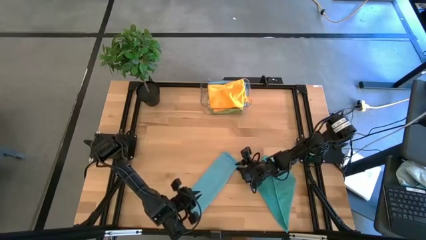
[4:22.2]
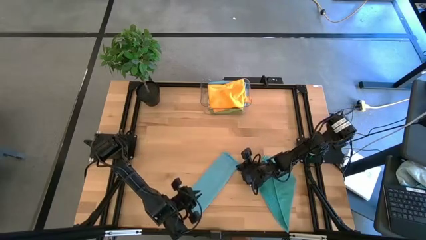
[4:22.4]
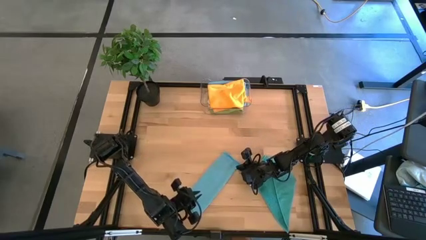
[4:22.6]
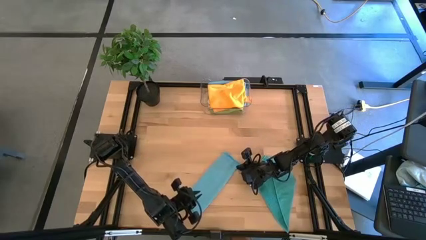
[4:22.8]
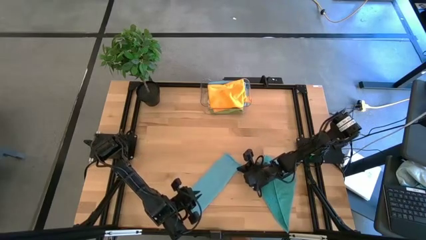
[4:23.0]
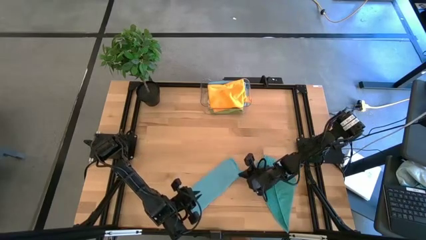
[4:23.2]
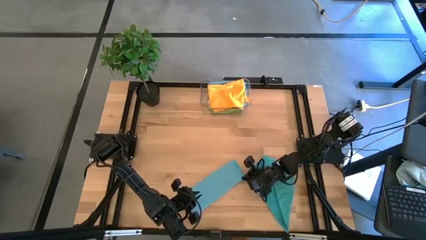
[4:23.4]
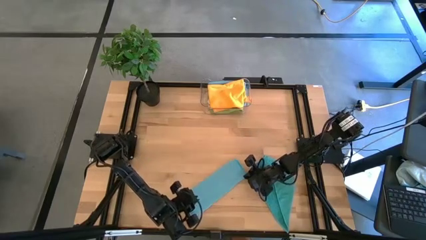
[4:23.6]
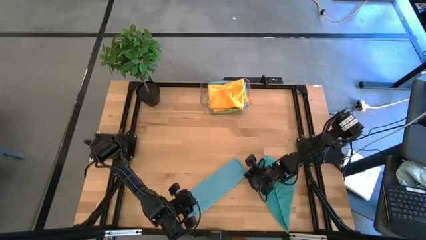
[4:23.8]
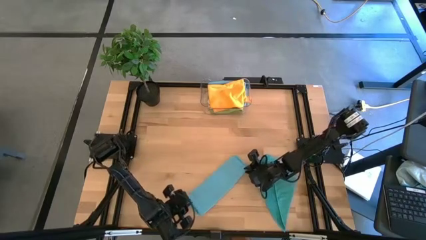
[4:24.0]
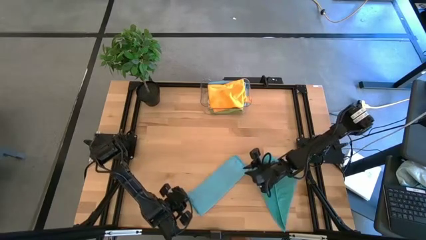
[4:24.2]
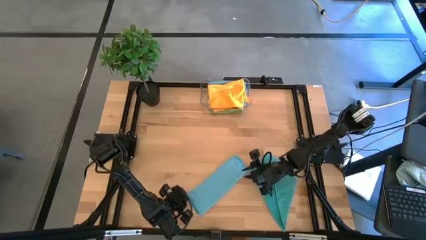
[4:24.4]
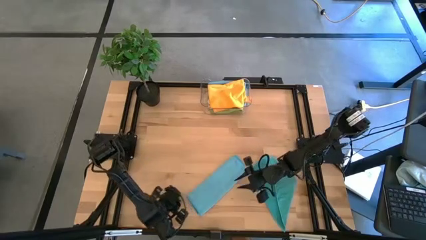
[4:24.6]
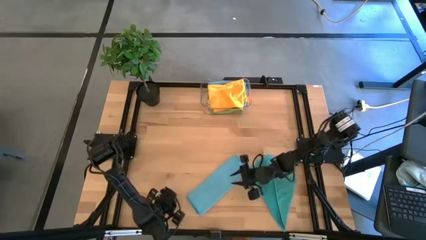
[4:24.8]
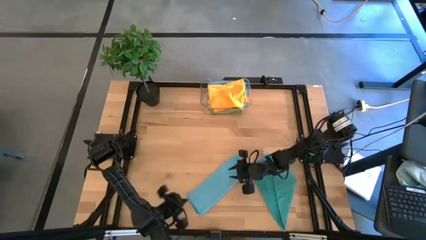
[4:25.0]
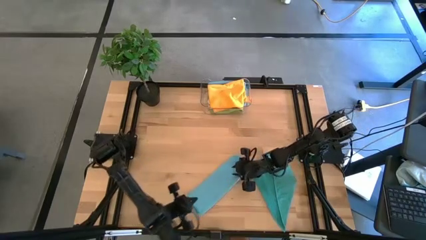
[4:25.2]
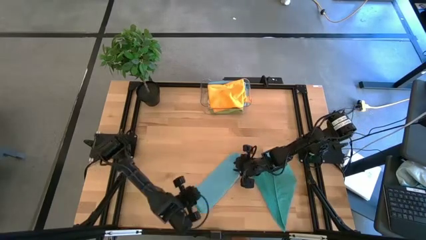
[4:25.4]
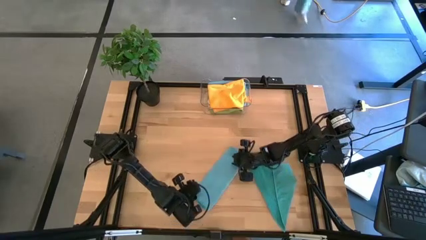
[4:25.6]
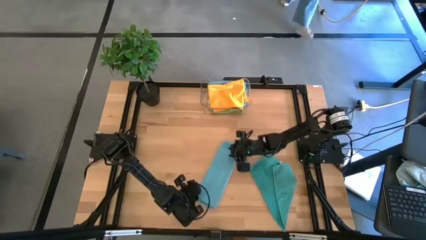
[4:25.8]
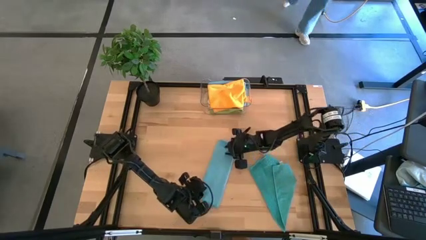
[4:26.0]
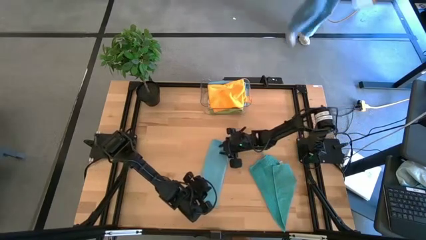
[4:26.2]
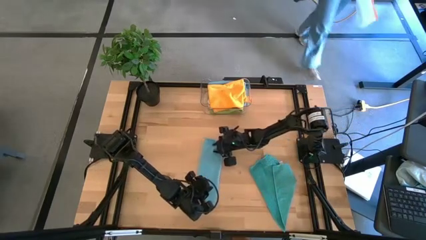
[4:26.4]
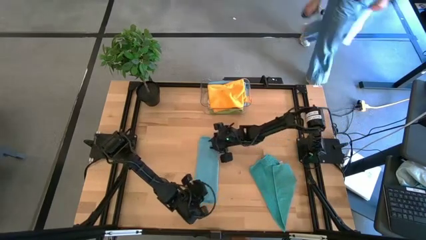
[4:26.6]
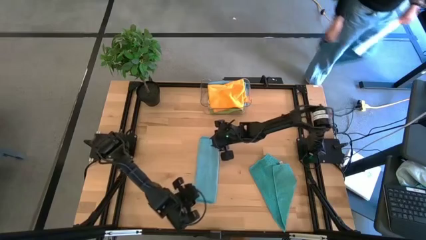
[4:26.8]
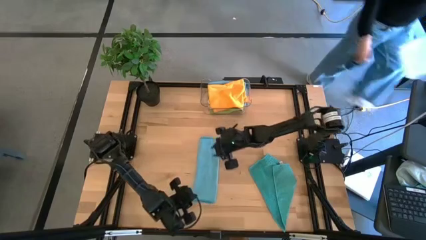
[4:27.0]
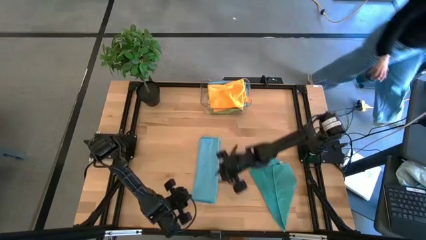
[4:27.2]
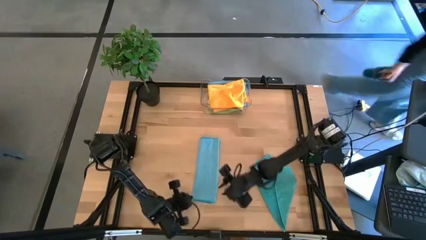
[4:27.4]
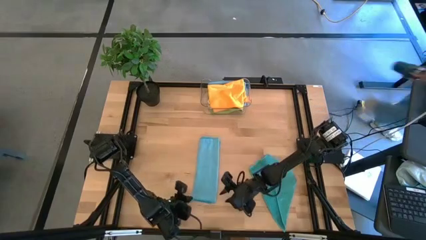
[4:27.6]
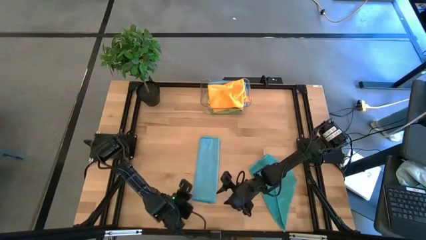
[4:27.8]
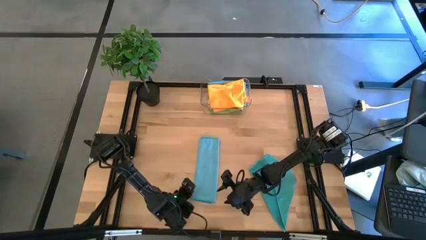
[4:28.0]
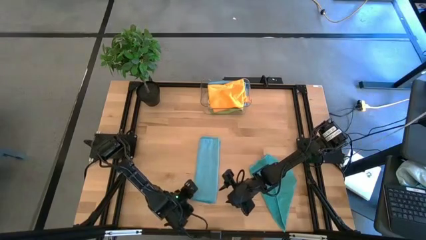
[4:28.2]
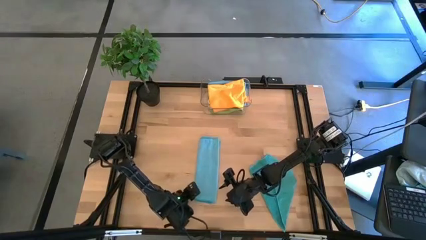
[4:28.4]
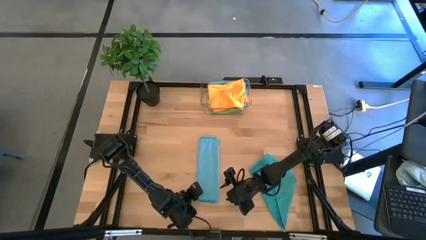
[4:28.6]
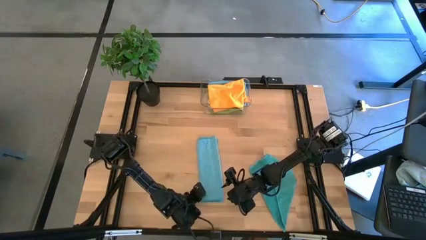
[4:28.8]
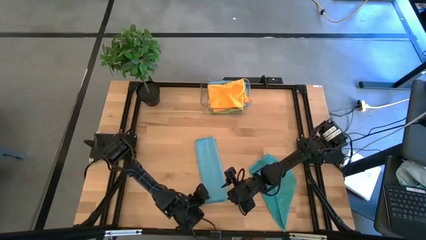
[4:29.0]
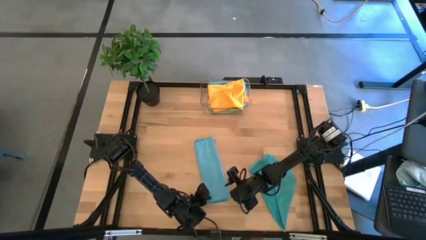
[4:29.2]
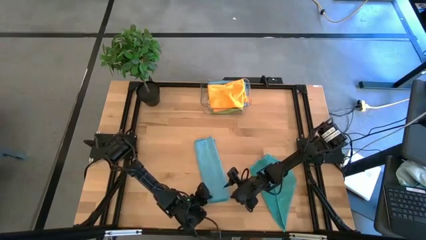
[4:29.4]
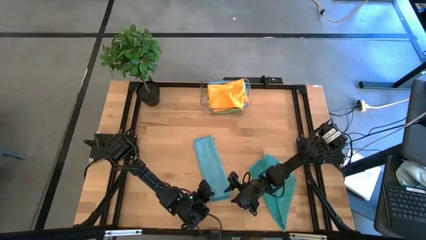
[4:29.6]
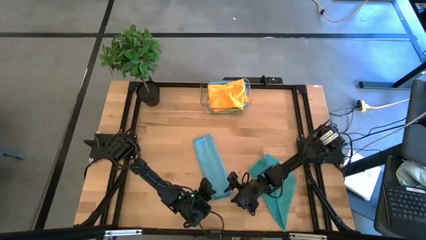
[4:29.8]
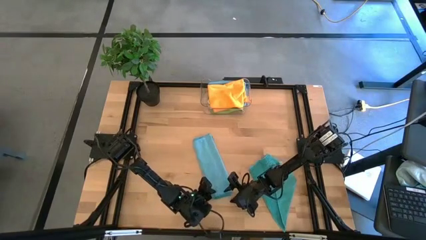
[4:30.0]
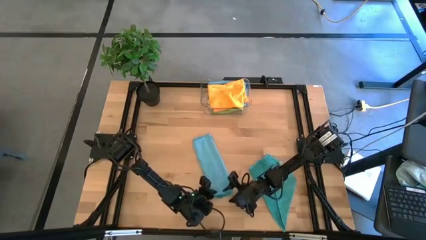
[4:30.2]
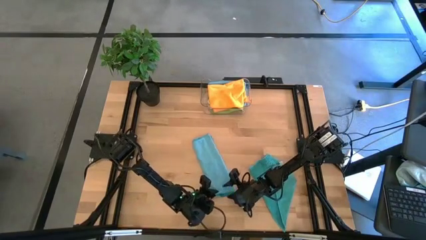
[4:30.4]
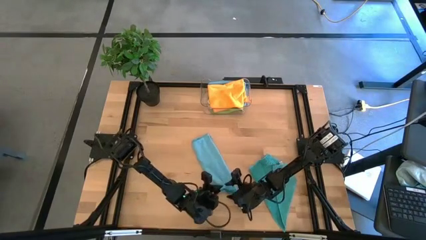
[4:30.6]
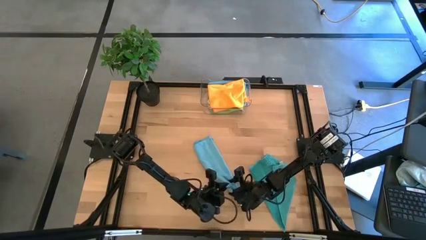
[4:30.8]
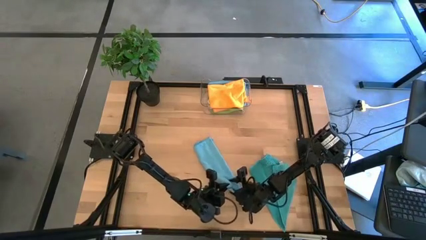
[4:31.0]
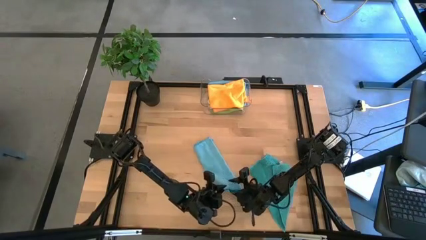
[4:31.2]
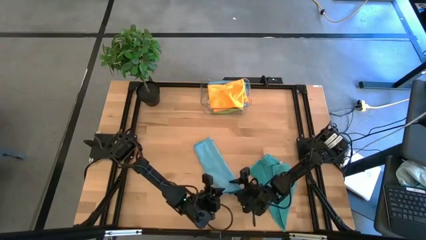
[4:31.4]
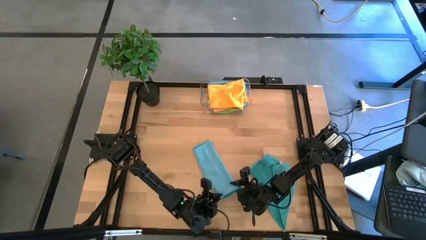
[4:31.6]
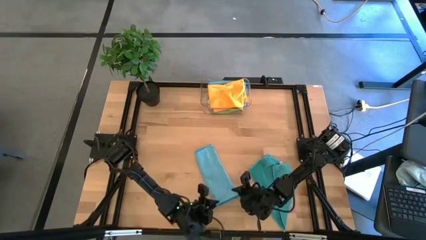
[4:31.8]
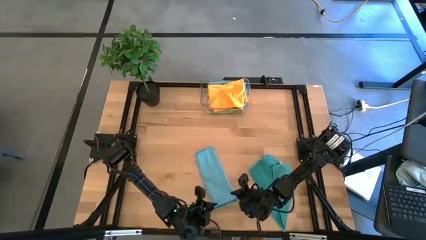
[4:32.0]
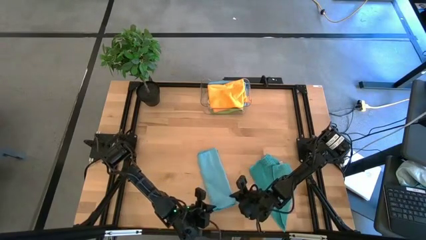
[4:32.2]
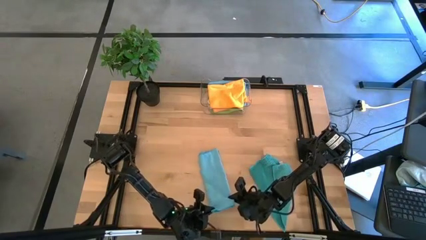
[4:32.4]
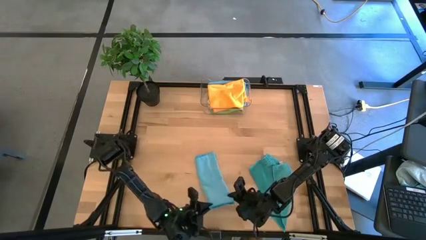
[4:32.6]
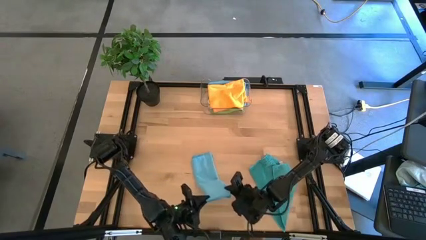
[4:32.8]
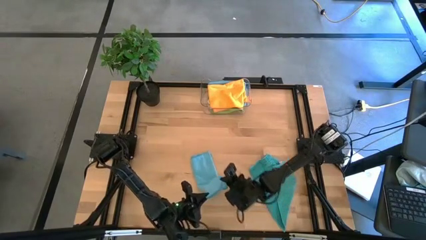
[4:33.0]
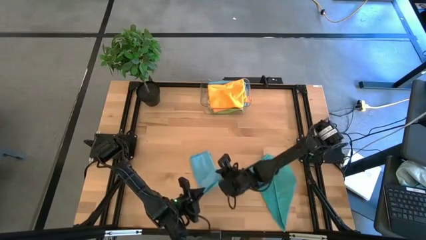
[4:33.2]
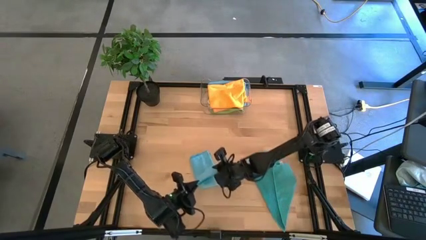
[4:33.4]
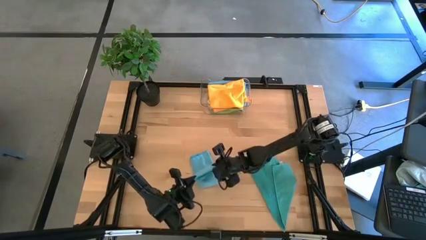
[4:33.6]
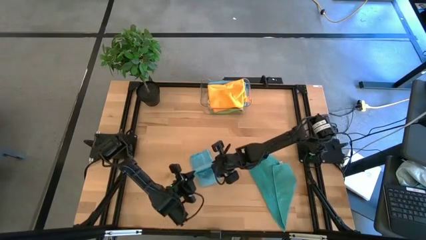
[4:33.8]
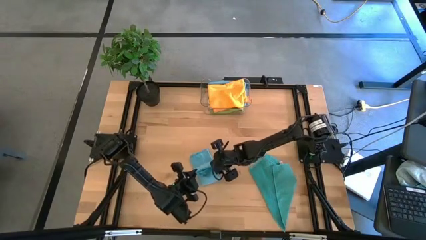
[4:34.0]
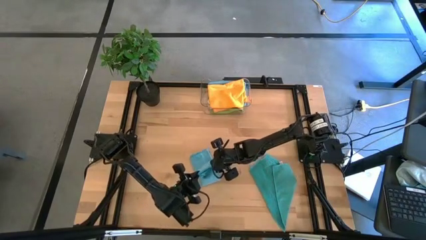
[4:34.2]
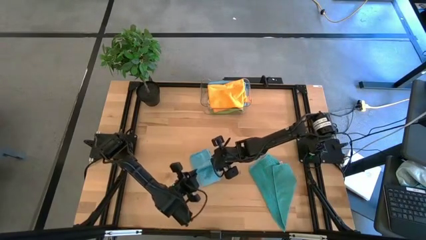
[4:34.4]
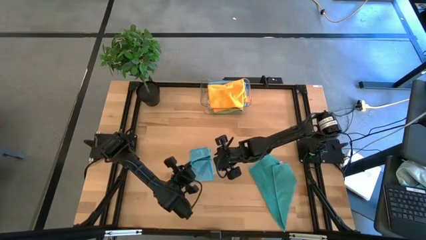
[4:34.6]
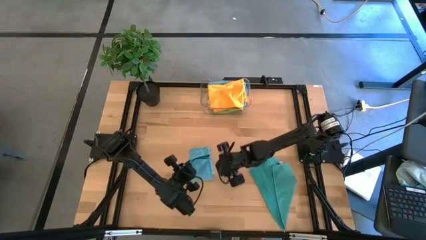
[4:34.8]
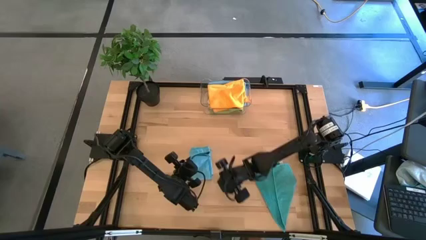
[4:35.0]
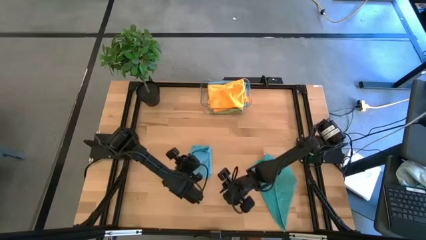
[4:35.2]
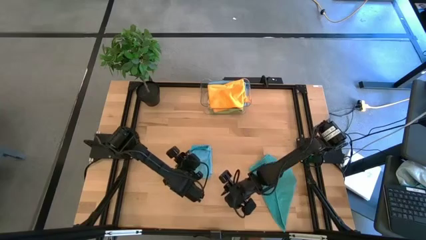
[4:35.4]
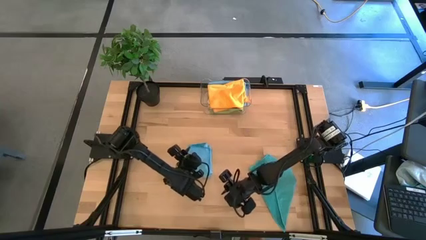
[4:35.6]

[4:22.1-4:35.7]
Task: Fold microfiber towels
Fold the top blue microfiber towel
